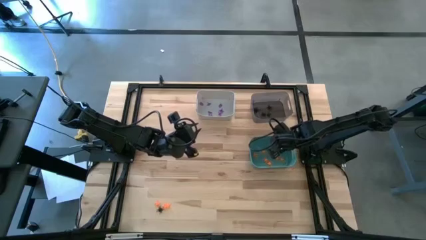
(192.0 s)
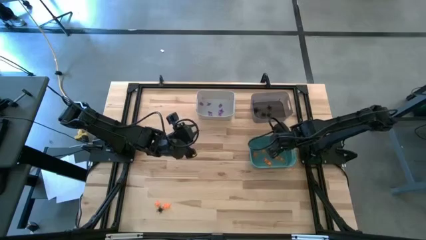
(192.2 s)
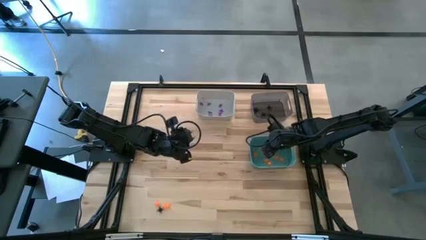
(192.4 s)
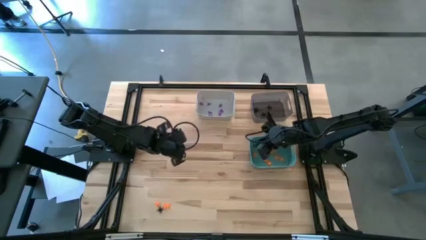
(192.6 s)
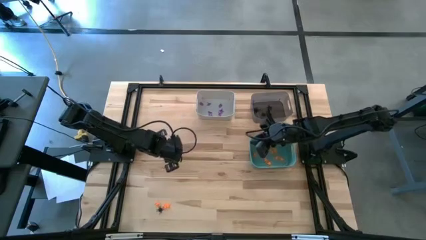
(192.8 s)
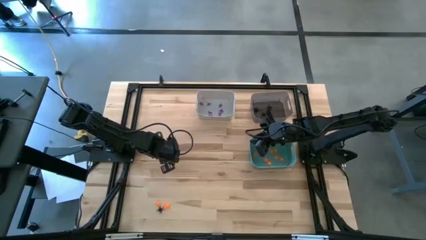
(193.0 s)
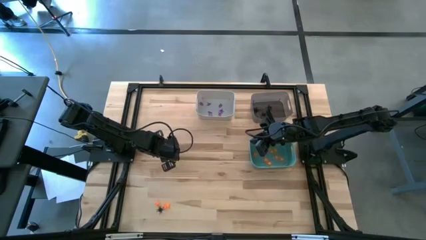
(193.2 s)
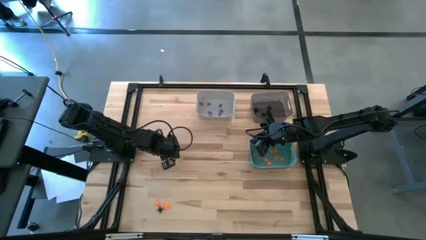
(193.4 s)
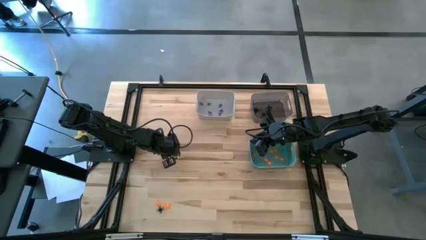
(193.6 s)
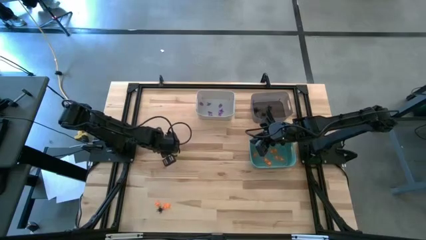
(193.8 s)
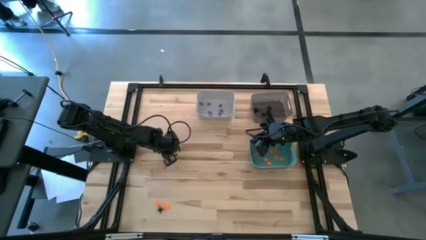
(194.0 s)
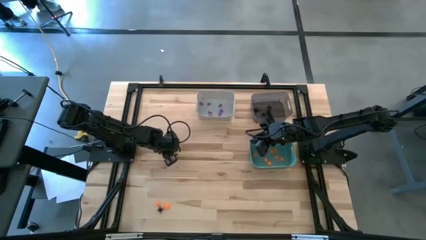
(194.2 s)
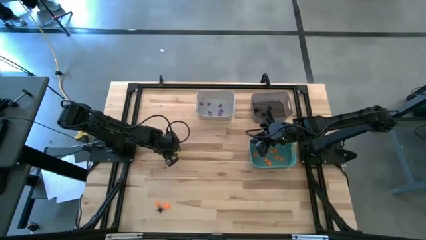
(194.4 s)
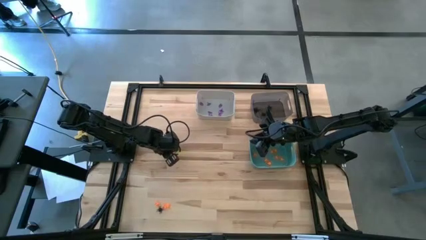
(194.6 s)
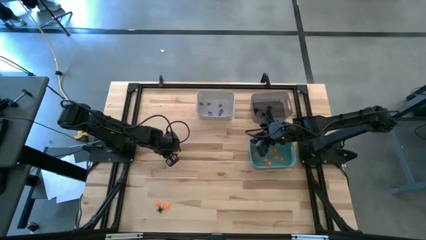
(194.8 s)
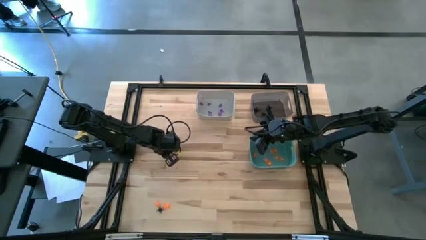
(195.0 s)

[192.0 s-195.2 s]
Task: Sort Halloween decoration
Put the orange spider toy into the green bin

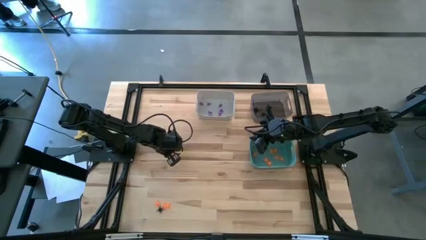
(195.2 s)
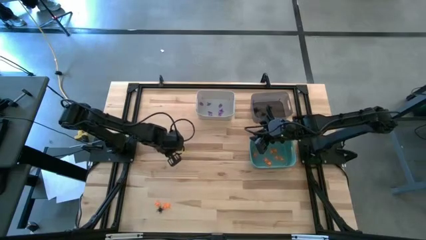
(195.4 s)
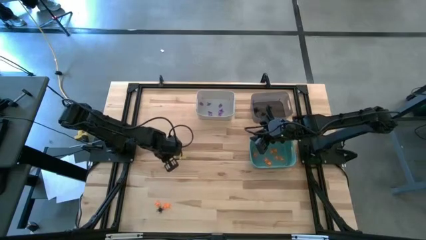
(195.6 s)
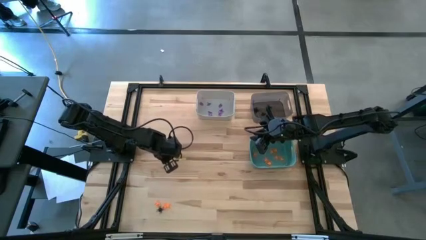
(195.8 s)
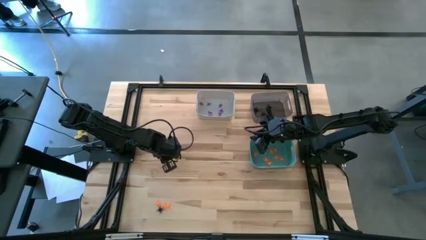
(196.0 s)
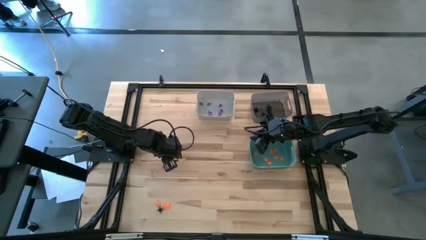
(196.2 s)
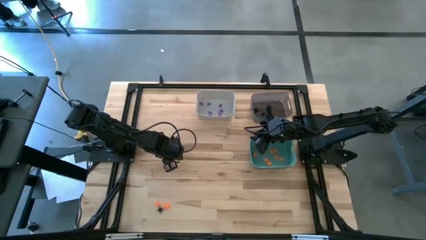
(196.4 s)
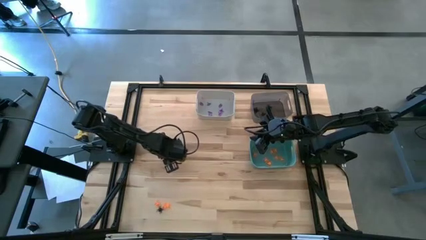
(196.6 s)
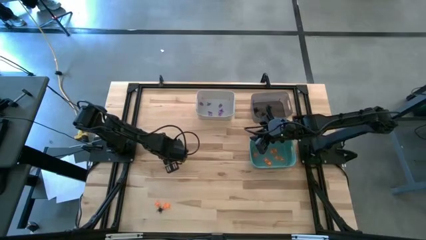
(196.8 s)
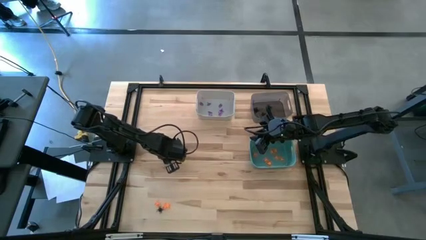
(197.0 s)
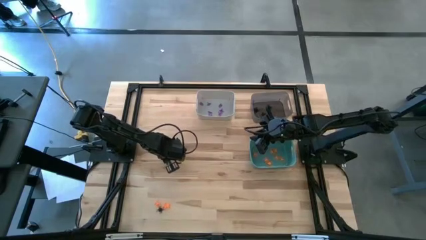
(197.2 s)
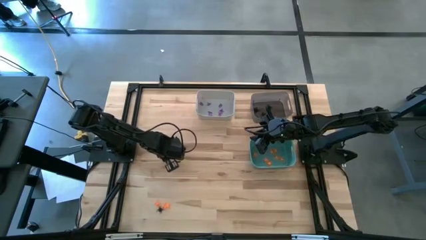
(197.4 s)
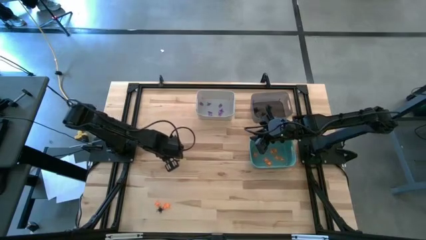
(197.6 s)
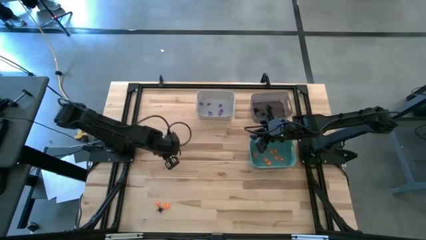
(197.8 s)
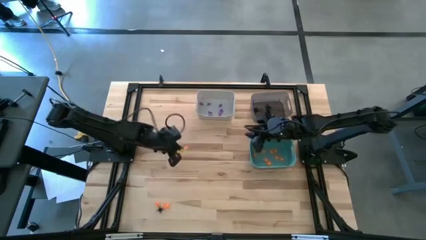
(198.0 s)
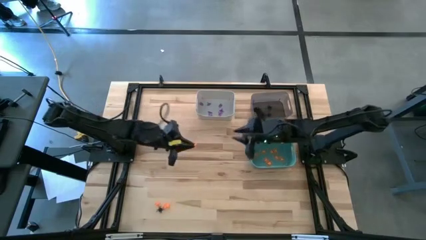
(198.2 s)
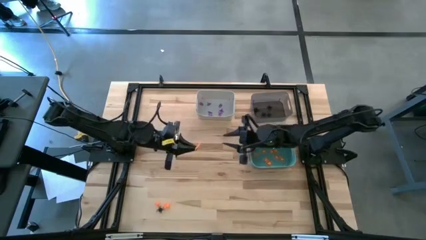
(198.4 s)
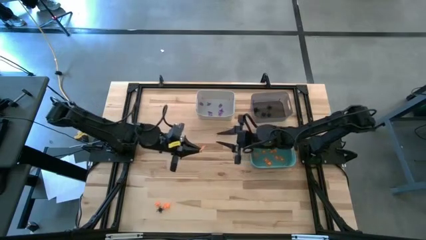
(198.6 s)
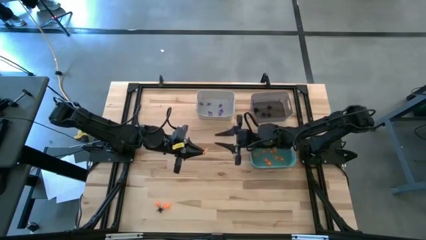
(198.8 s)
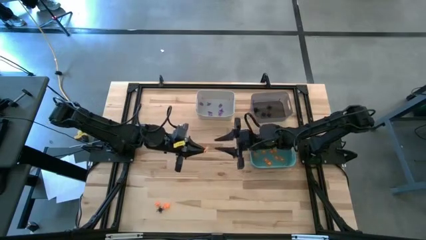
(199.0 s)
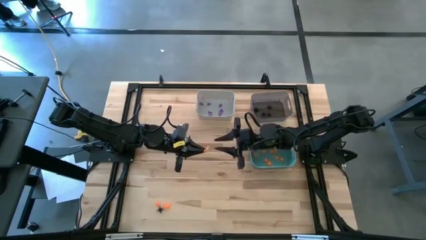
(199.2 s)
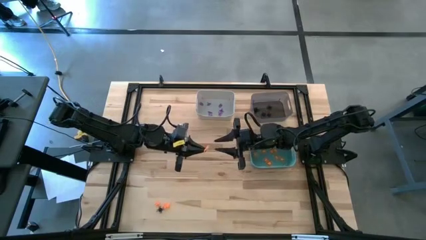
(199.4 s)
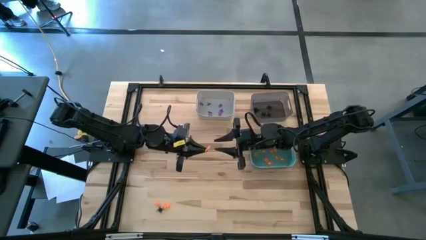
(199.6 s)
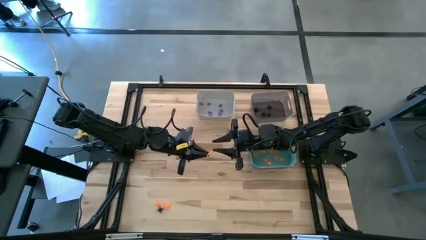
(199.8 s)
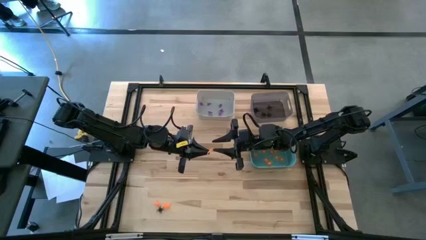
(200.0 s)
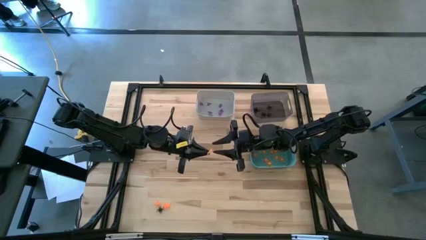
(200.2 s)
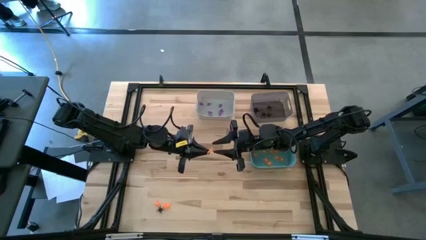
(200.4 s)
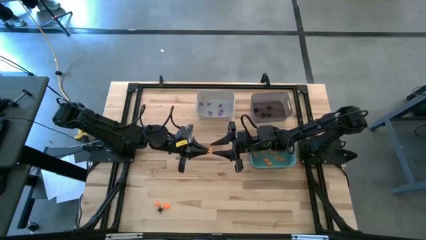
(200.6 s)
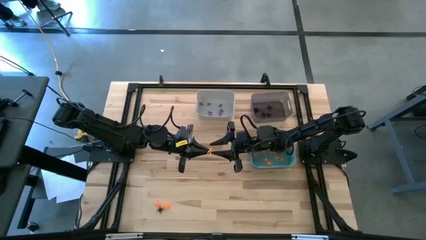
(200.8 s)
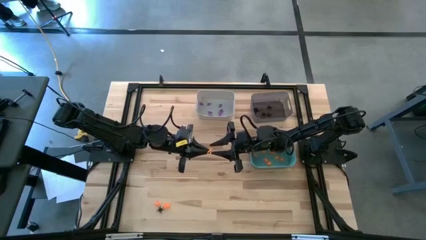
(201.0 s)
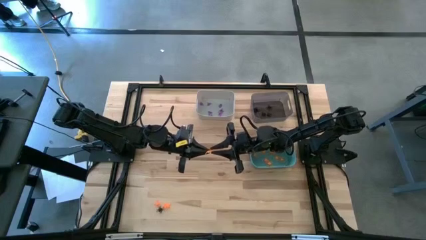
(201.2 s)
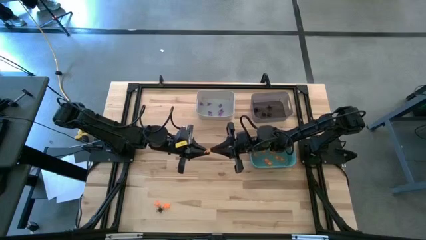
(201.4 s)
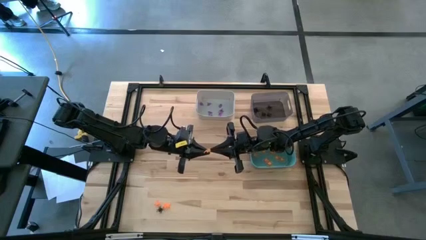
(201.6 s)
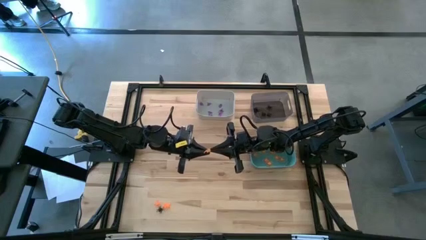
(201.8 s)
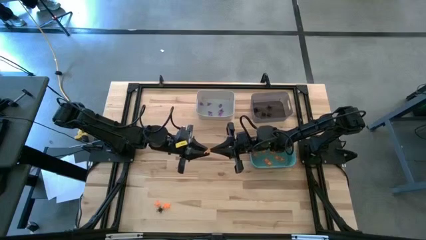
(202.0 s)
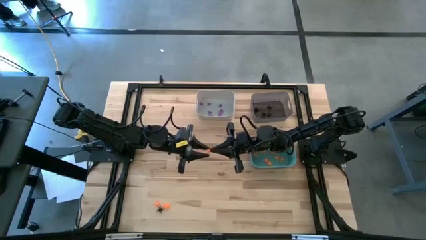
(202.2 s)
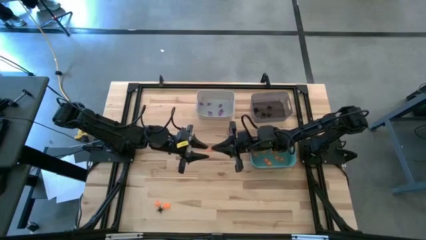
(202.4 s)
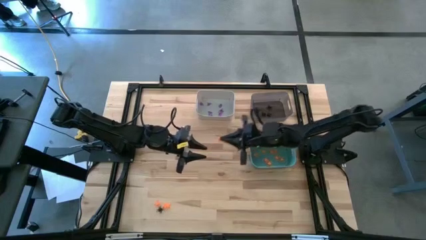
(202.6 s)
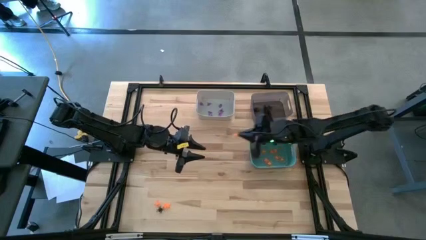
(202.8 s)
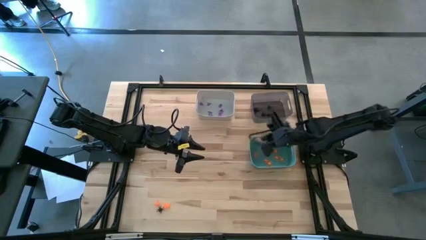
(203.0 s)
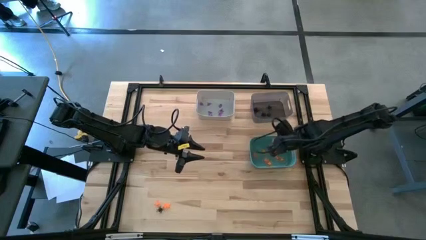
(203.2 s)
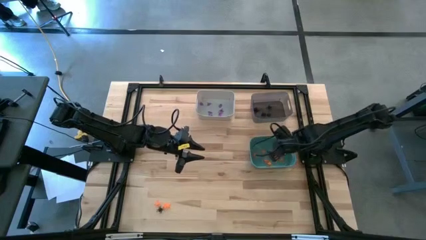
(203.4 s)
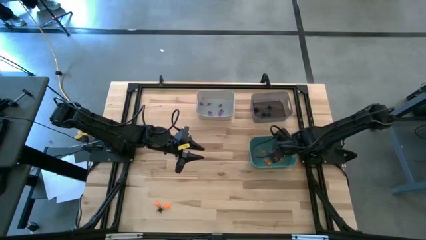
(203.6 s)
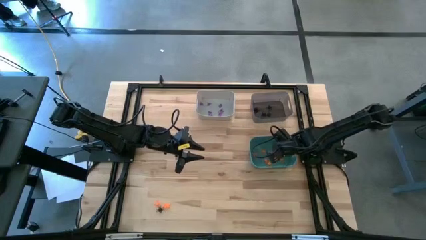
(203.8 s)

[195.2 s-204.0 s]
Put the orange spider toy into the green bin

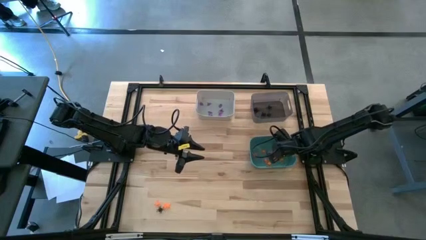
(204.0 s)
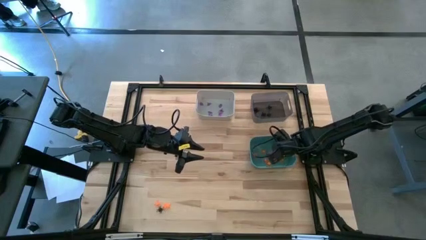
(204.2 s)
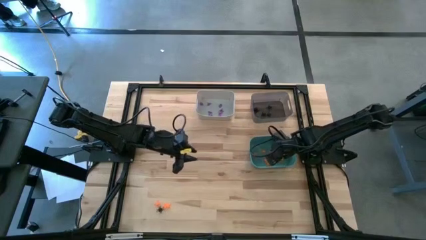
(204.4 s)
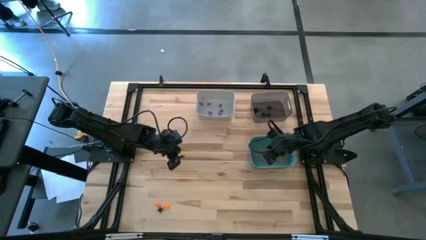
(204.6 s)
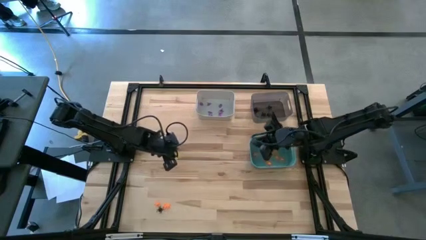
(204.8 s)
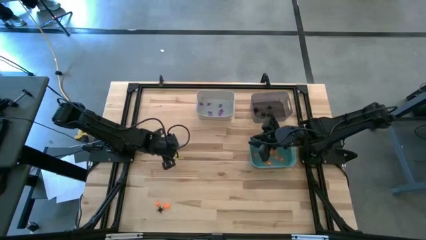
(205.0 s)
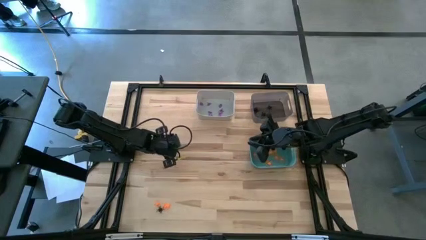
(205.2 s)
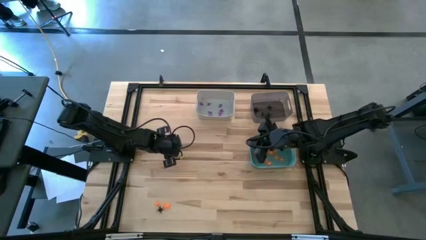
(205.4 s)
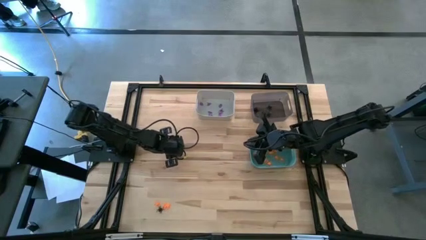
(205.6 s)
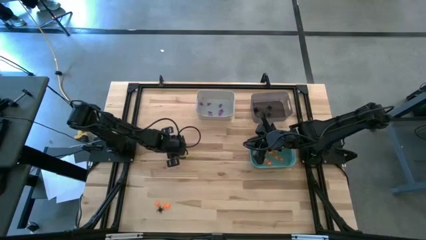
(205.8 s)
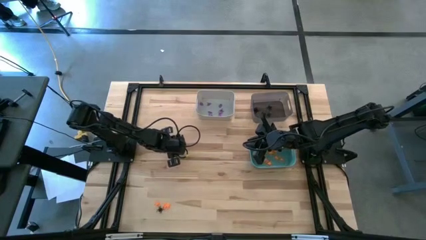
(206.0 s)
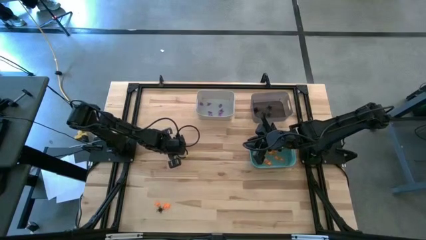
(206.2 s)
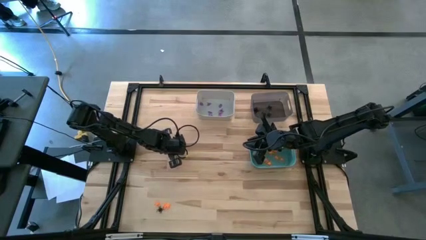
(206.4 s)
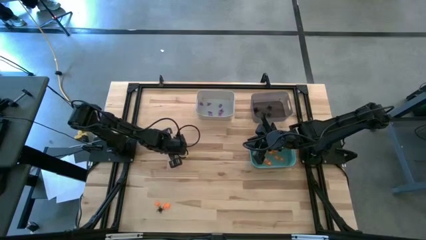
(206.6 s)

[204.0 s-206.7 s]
Put the black spider toy into the black bin

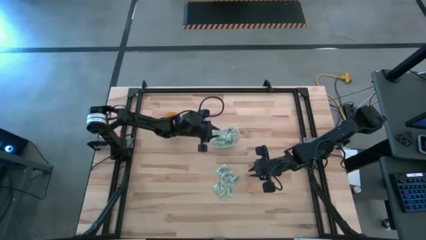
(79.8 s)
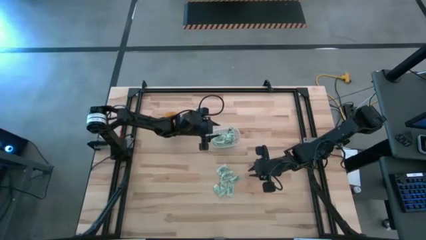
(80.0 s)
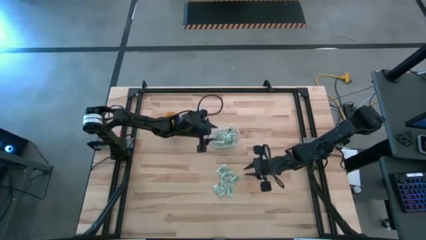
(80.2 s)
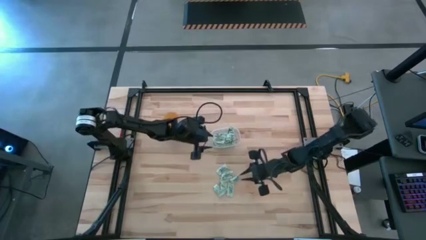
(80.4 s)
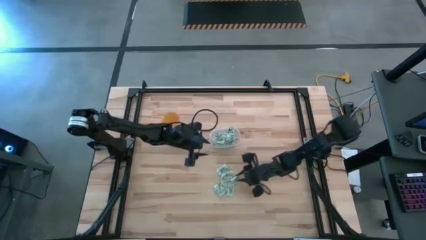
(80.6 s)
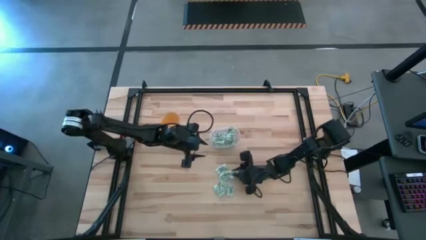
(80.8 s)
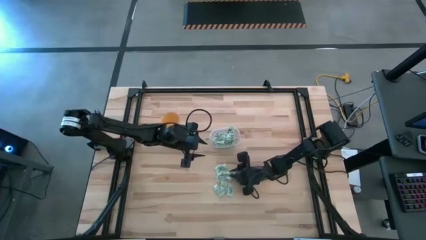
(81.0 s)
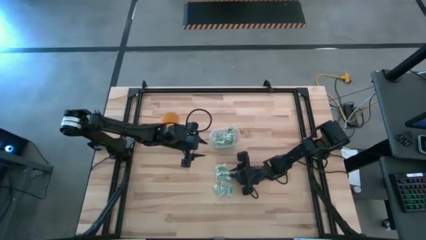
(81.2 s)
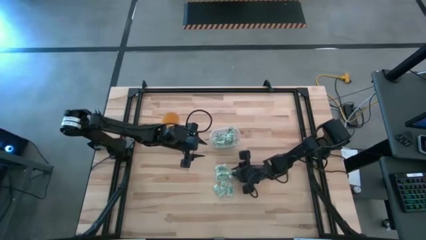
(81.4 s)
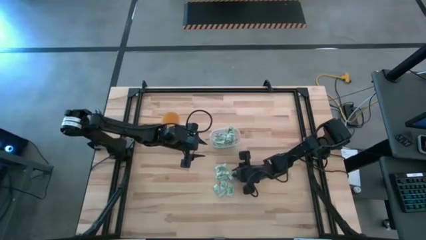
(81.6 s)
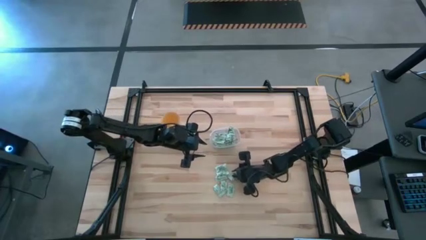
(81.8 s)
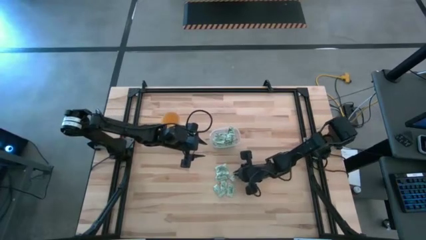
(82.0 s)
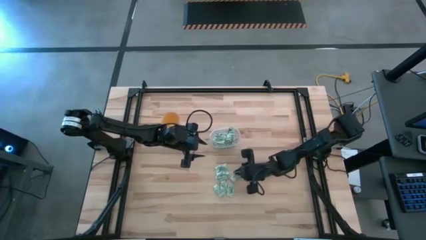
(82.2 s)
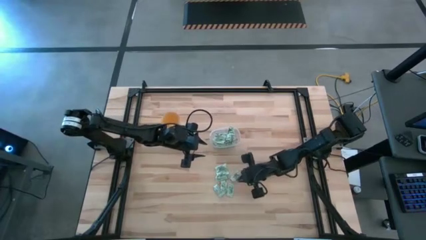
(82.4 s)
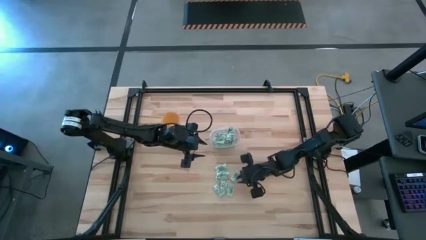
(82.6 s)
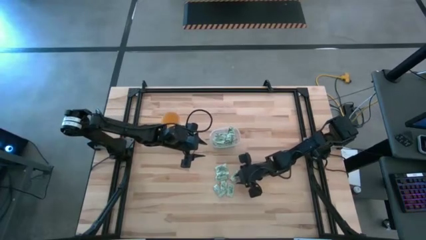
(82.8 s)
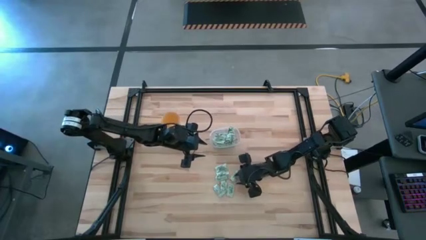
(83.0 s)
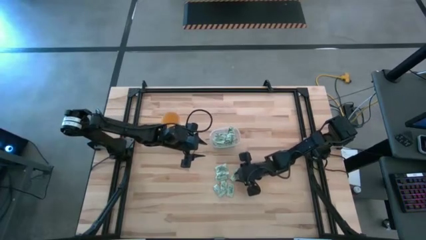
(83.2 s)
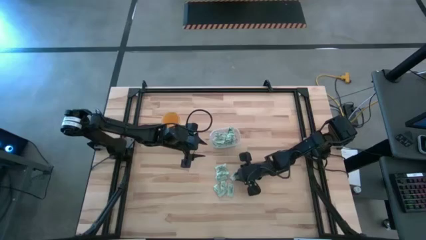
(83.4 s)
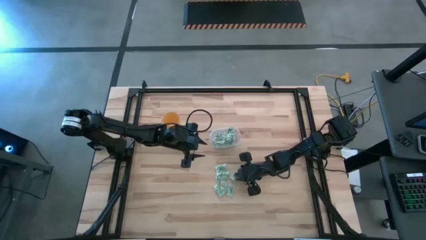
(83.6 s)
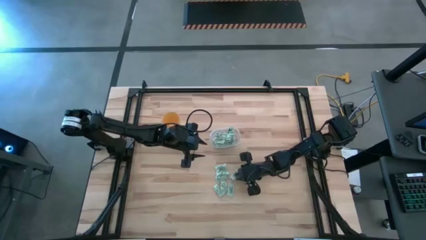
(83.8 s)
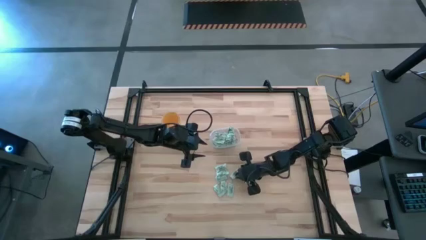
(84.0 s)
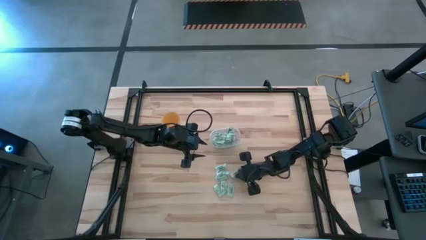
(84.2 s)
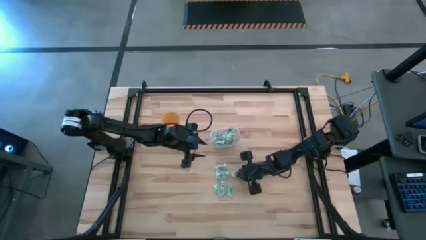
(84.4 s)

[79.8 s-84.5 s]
Task: Pick and place Stevia / Truvia into bins
Put the stevia packet into the transparent bin
